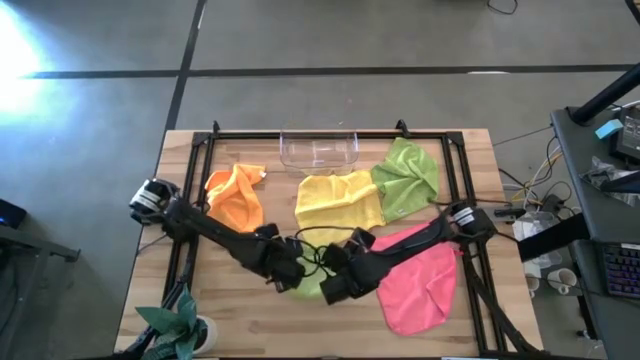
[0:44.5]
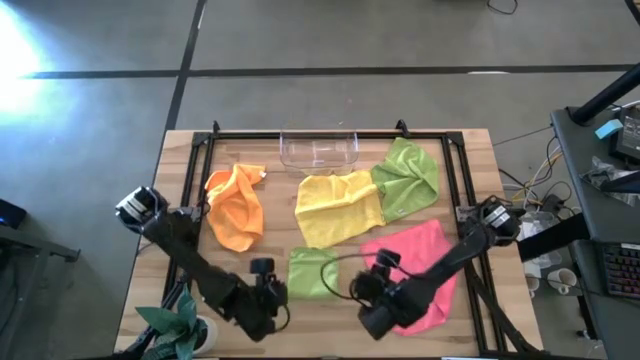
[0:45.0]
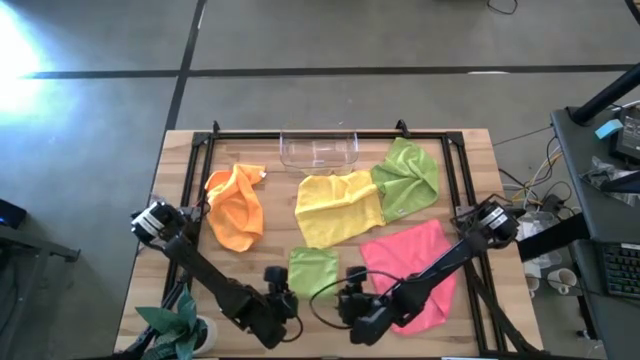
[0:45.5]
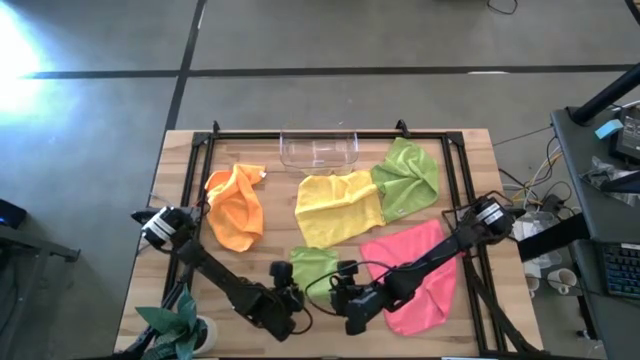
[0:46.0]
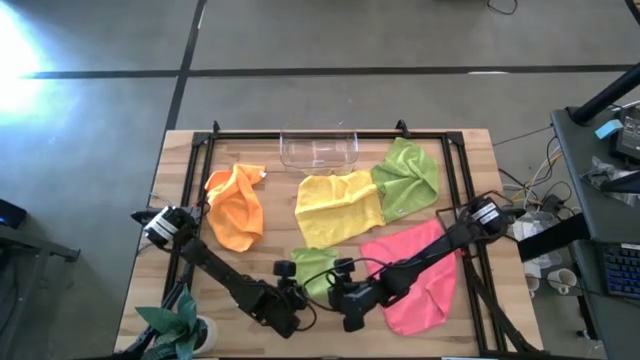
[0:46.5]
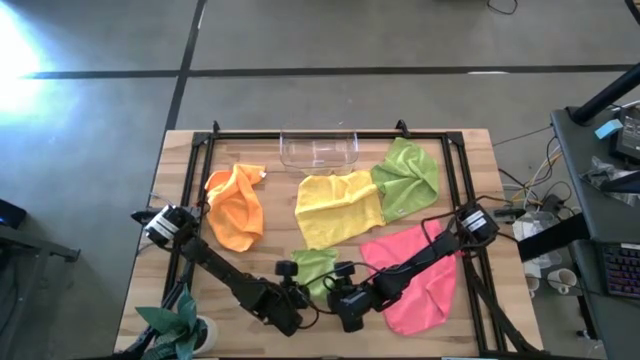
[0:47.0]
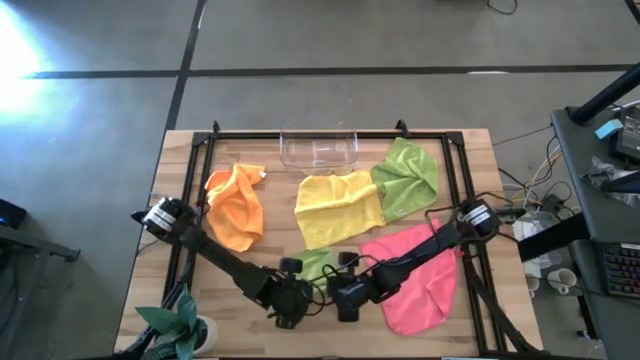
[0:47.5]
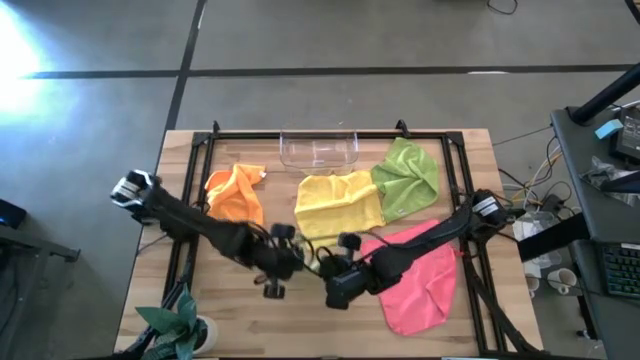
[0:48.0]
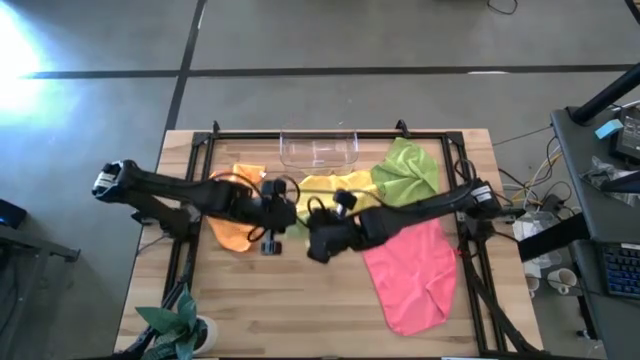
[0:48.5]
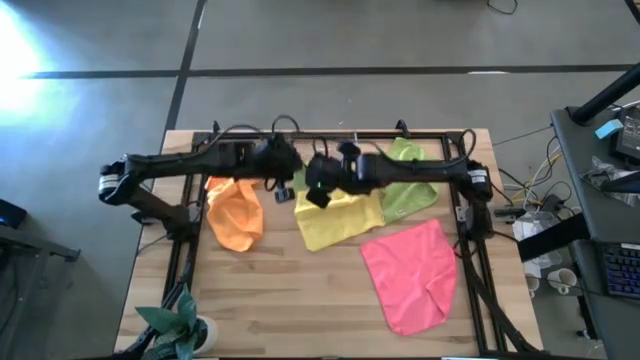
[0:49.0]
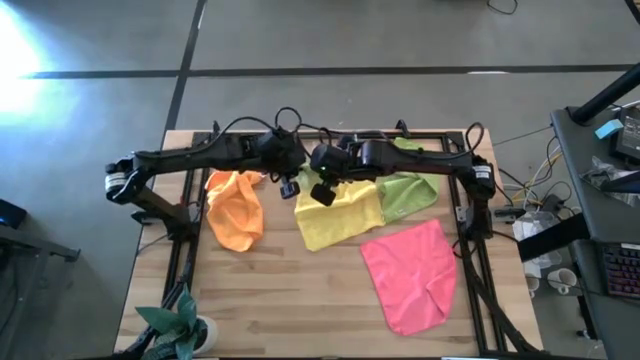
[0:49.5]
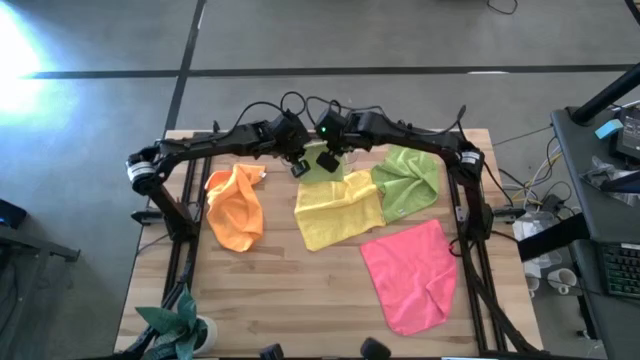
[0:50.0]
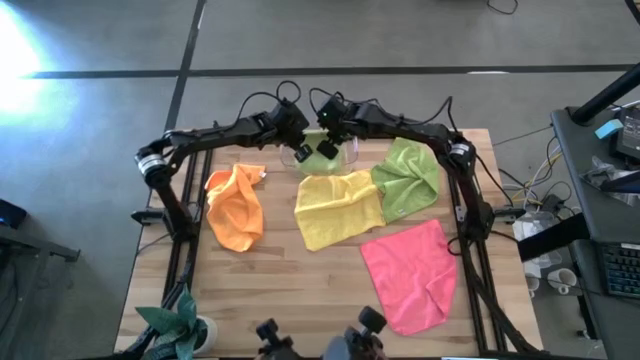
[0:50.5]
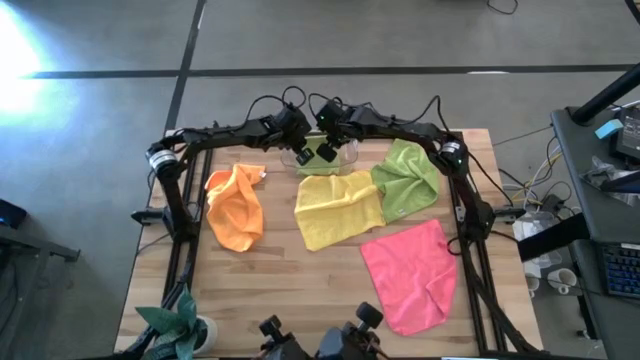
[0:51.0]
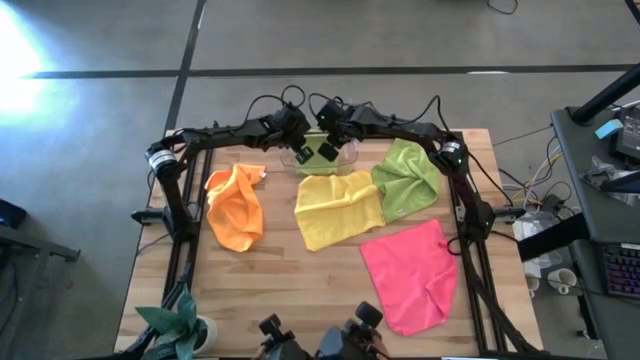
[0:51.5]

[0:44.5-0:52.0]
Task: Fold microfiber towels
Put the folded green microfiber cloth into the transparent bin

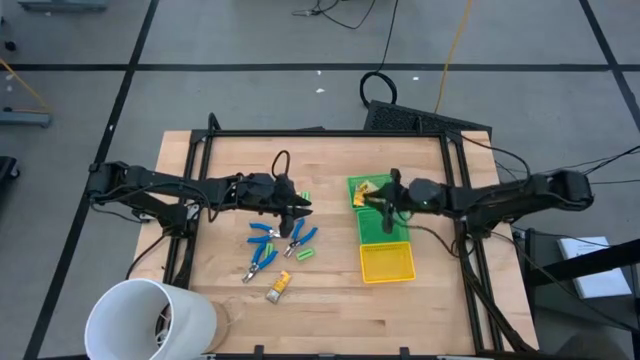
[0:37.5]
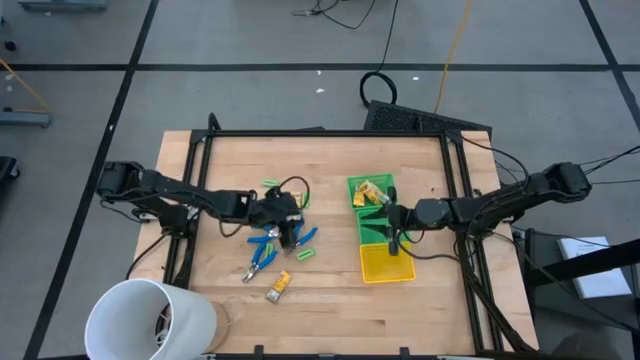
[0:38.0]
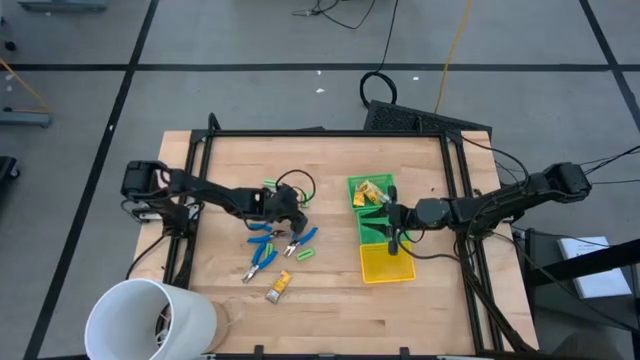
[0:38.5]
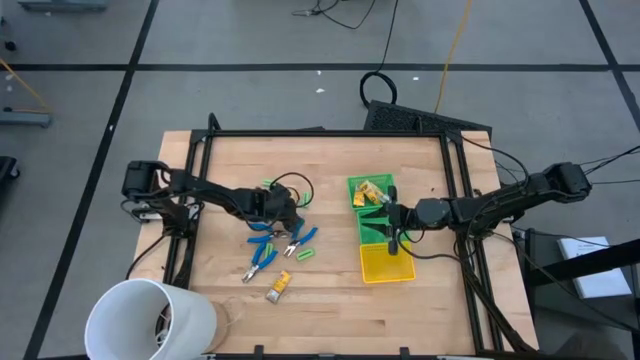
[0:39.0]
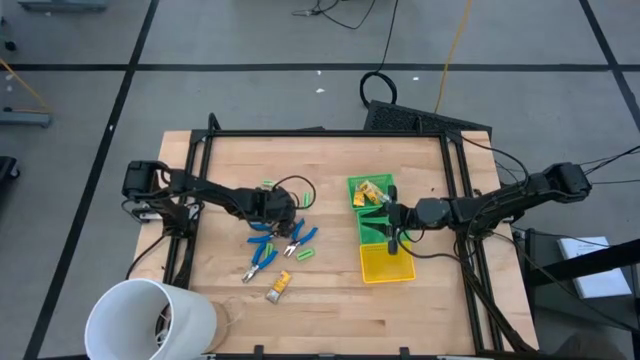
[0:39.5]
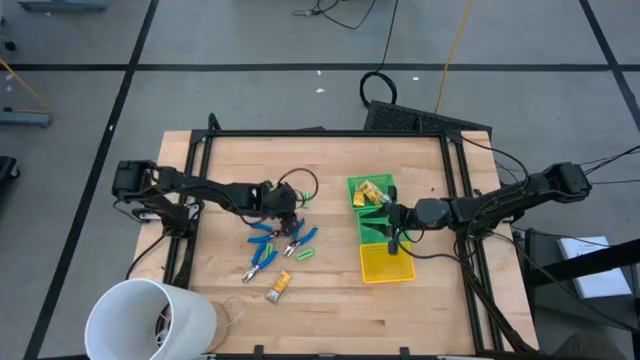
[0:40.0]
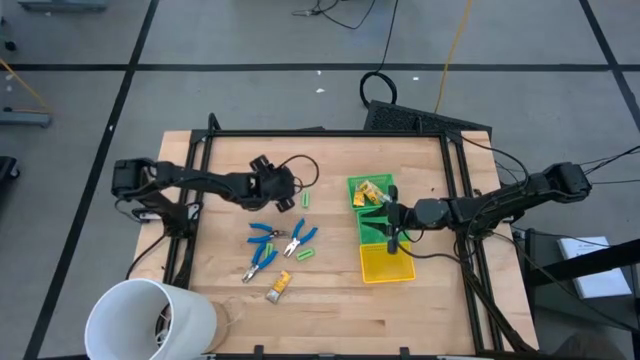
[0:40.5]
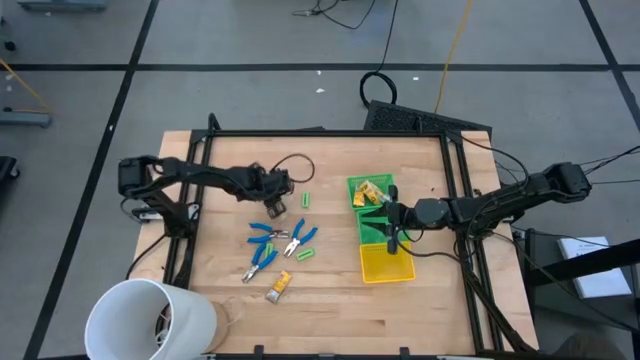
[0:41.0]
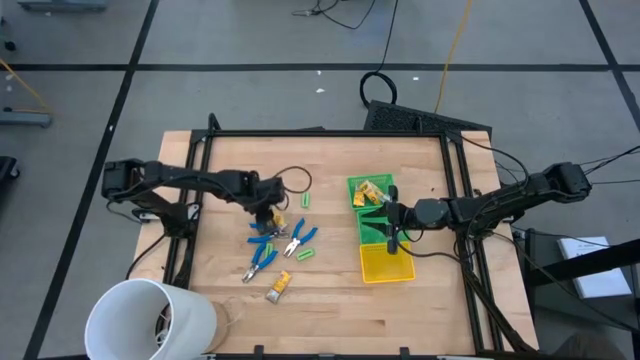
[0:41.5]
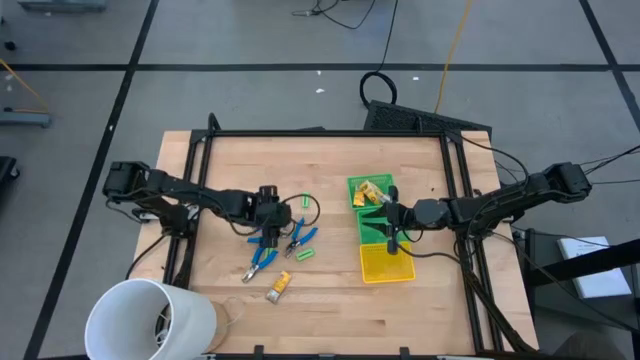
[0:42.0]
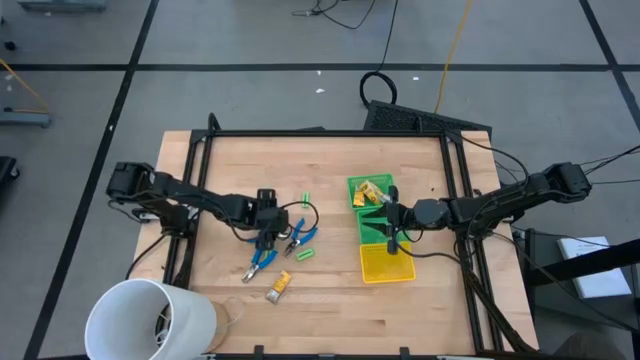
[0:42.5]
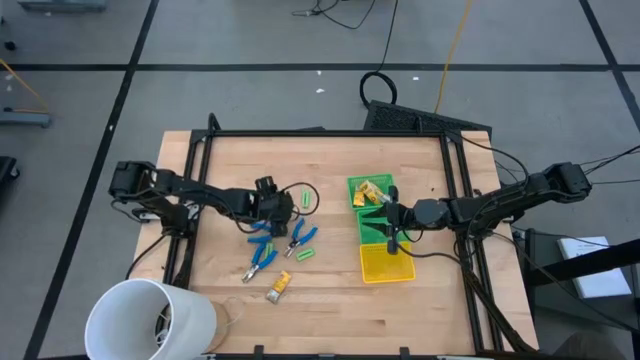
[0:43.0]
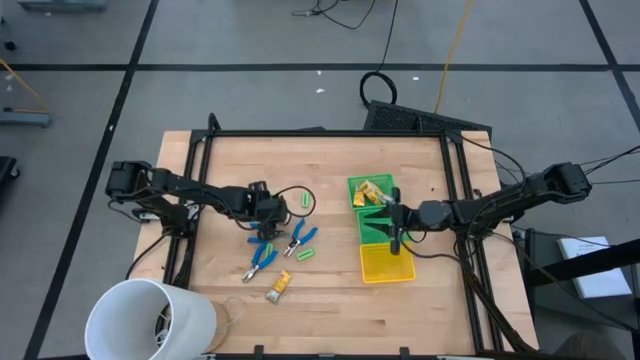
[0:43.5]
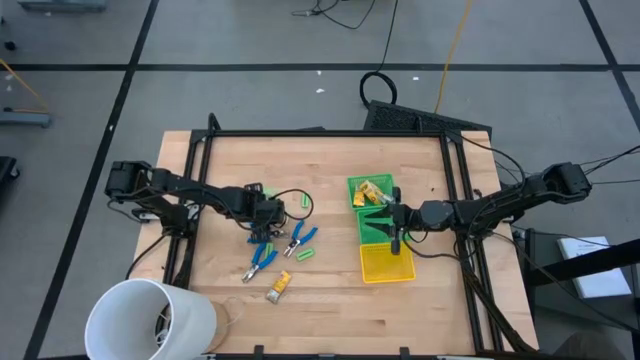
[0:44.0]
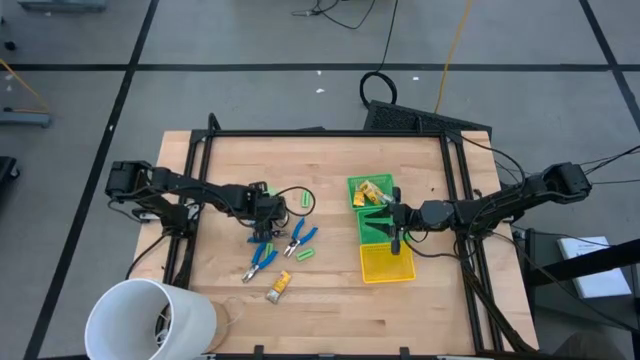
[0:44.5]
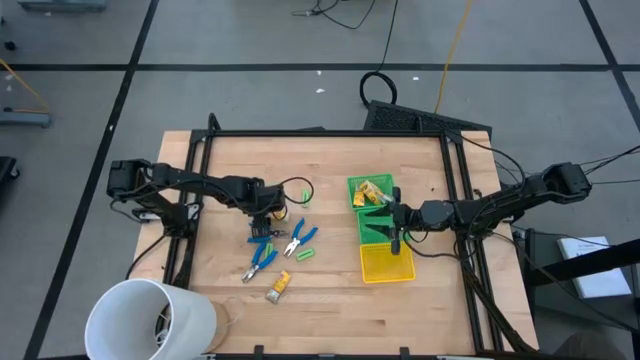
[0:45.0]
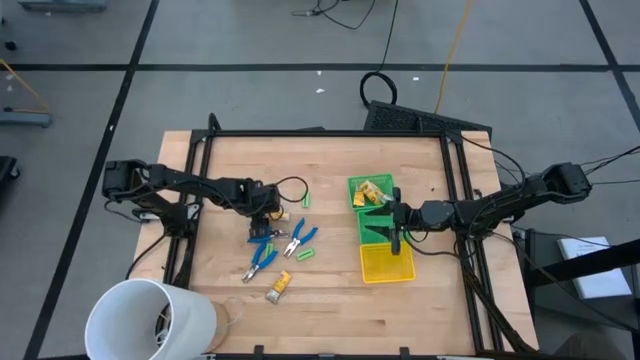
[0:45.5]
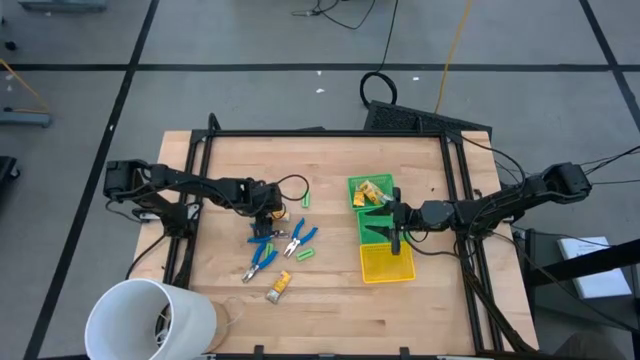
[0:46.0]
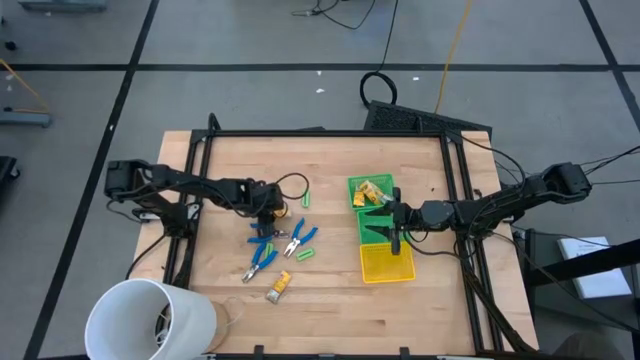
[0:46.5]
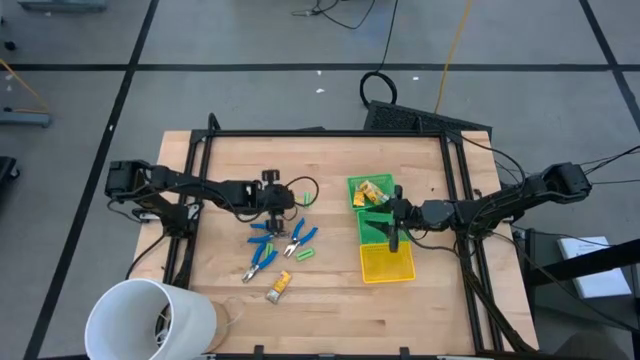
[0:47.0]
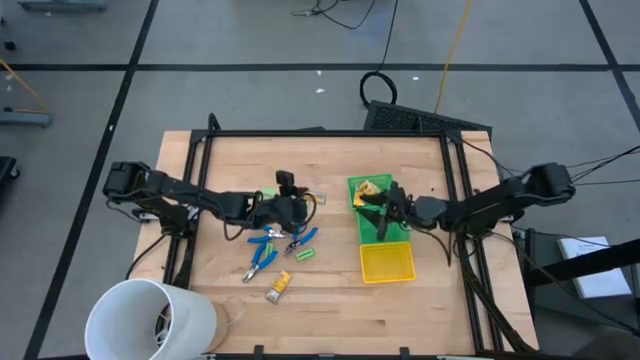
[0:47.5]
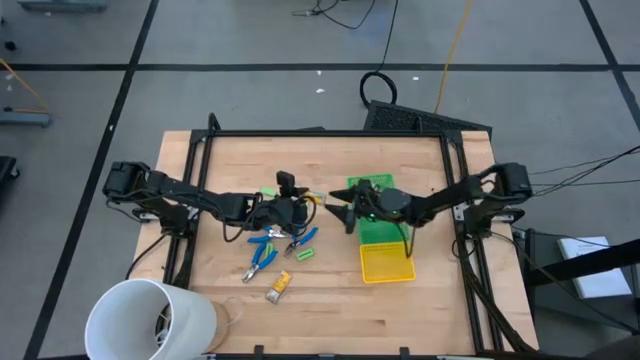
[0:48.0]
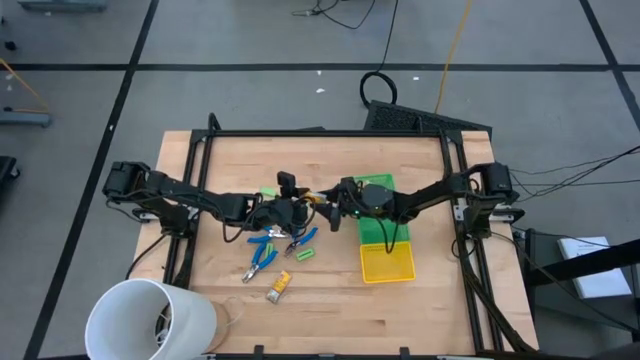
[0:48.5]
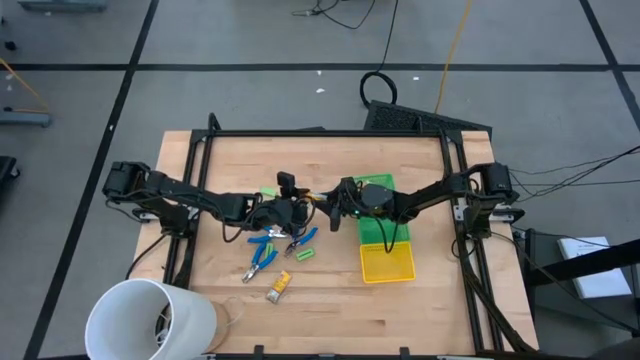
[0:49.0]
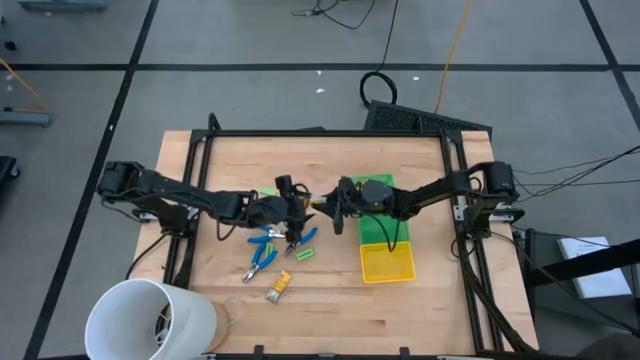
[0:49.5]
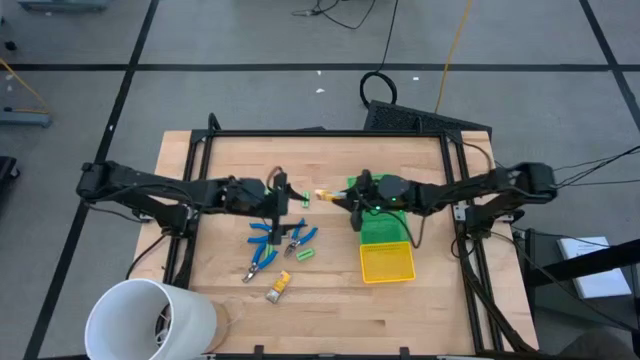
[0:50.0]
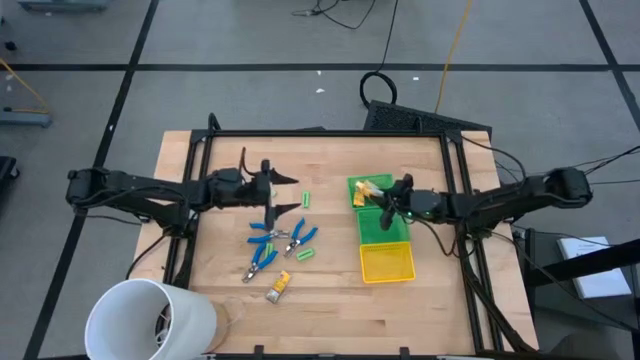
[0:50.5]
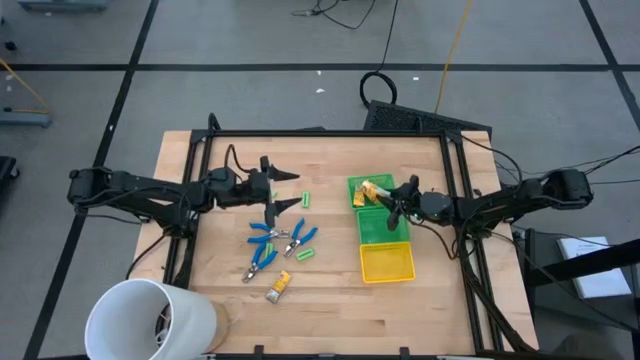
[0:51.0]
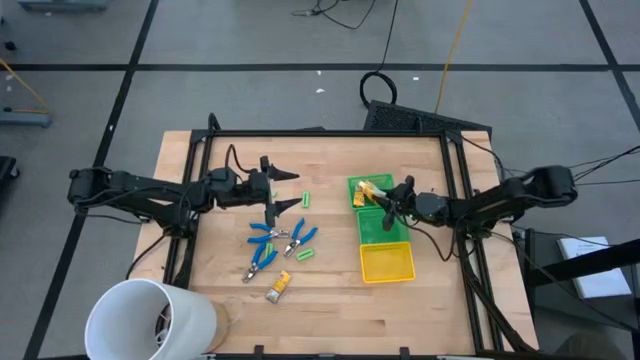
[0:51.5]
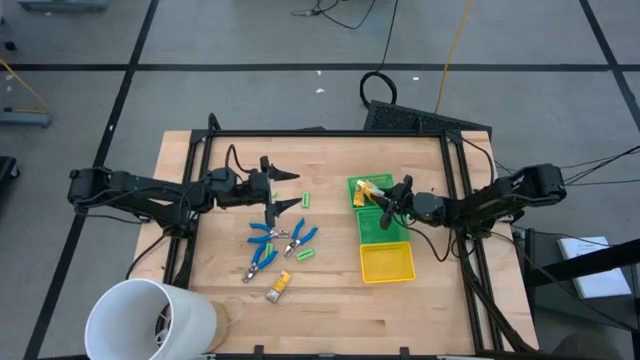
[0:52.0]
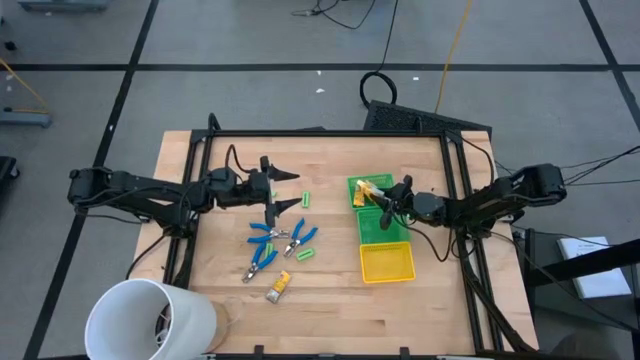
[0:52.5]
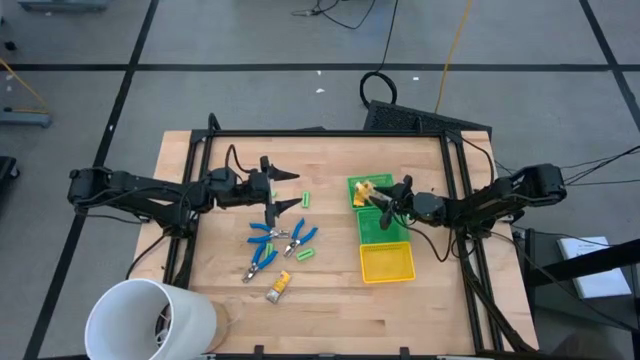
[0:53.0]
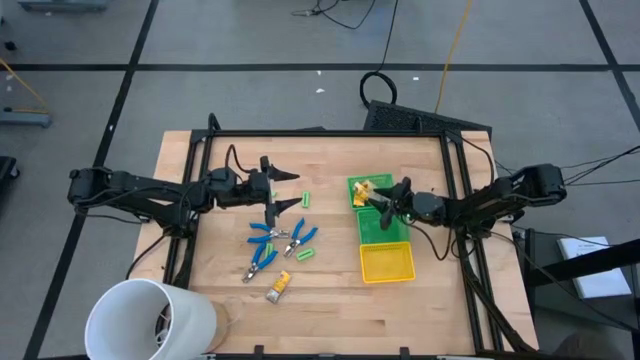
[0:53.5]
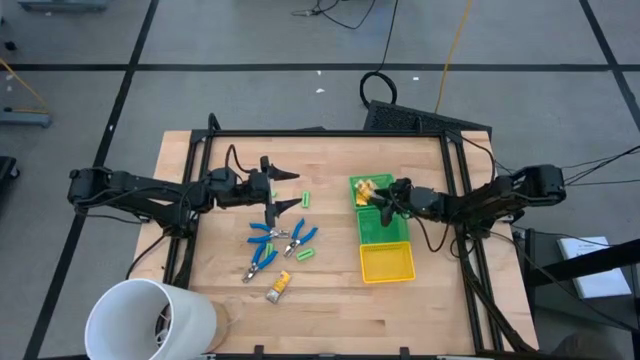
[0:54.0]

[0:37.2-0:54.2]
Task: Pick & Place School Supplies
Put the yellow crayon box into the top green bin
